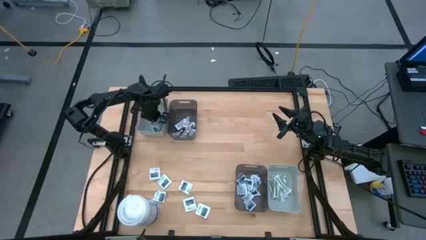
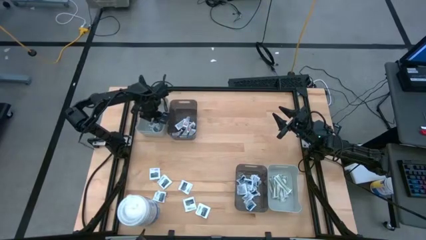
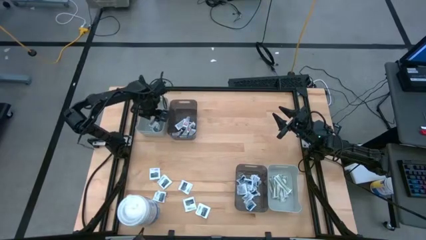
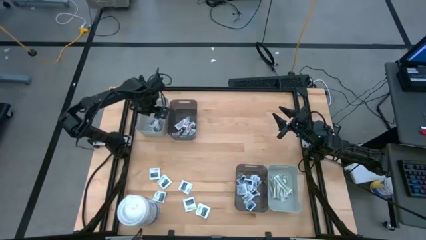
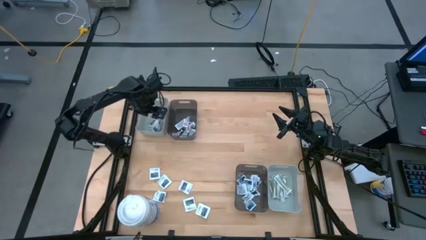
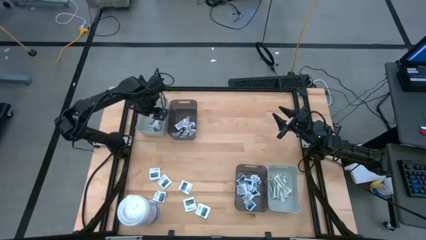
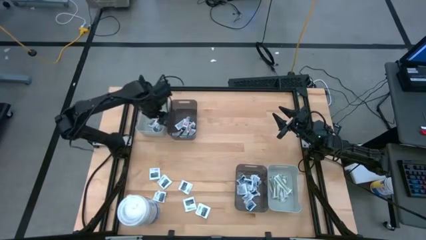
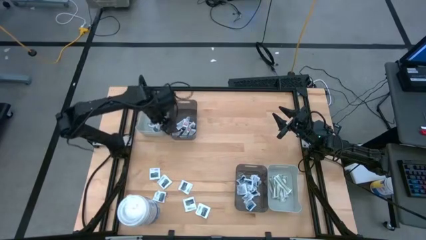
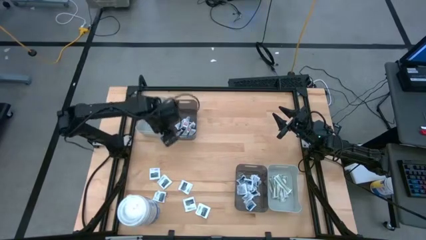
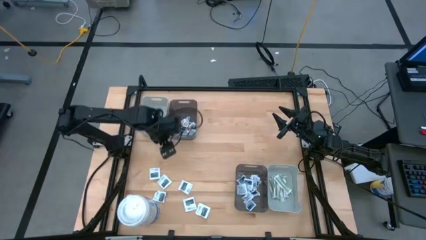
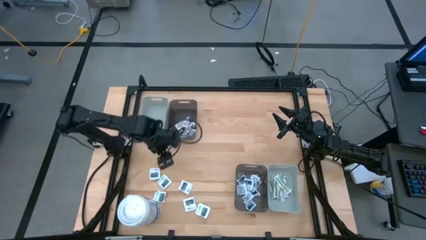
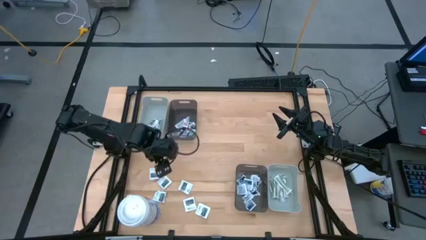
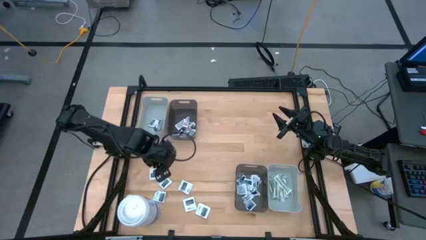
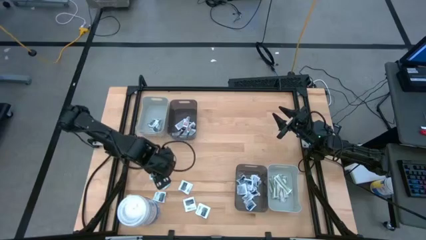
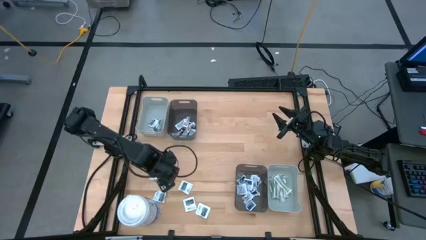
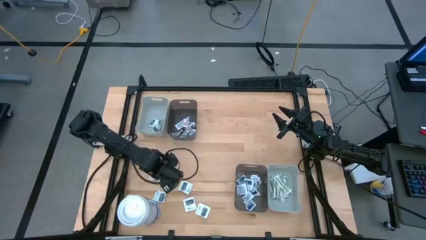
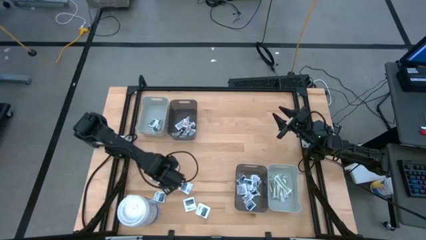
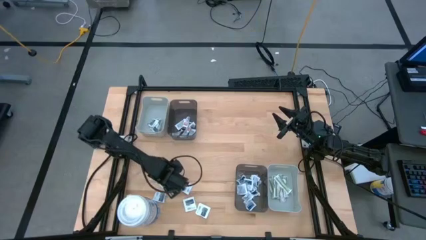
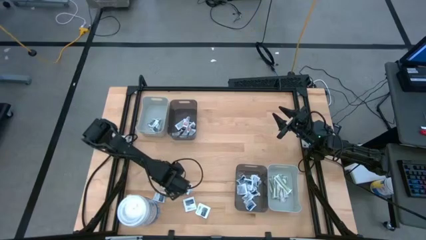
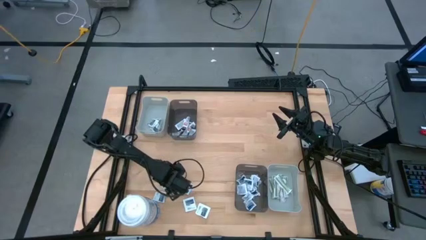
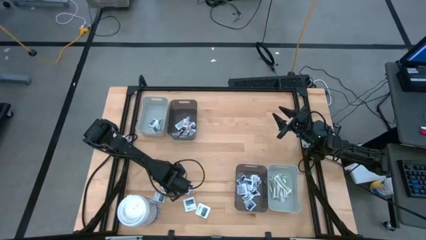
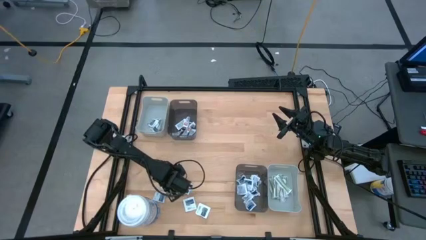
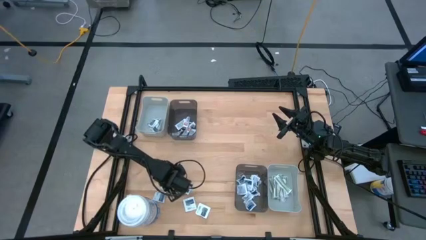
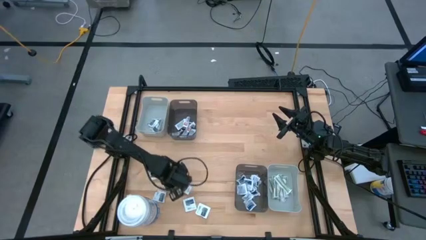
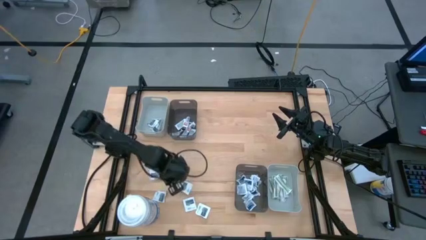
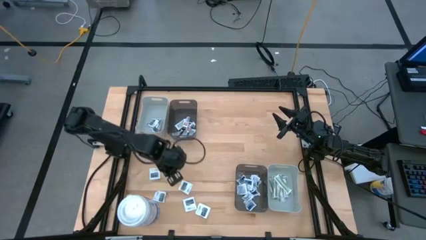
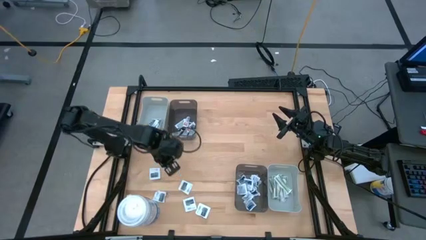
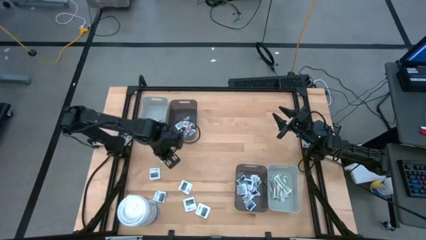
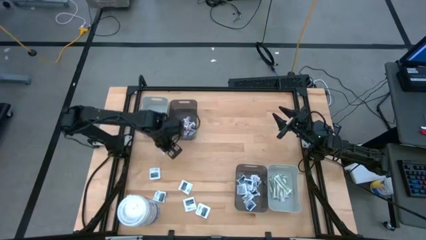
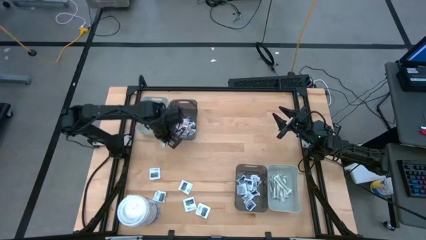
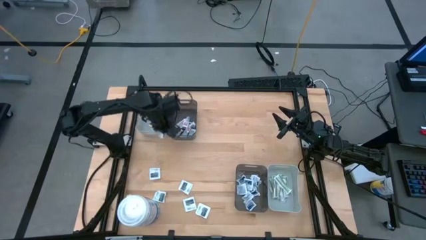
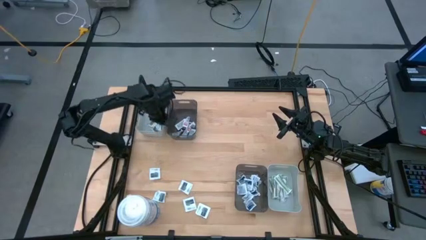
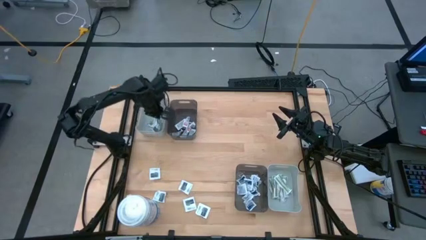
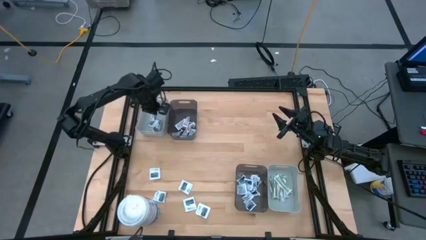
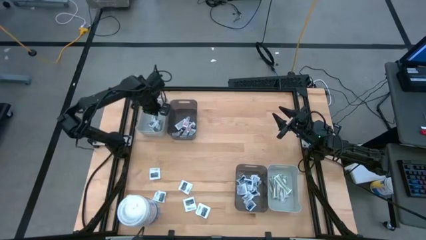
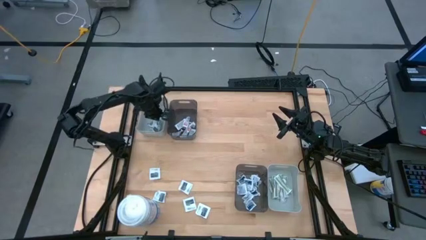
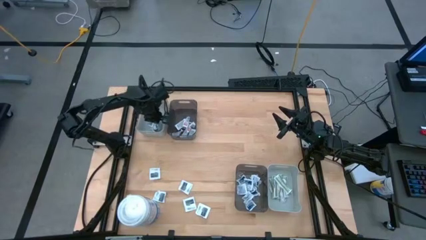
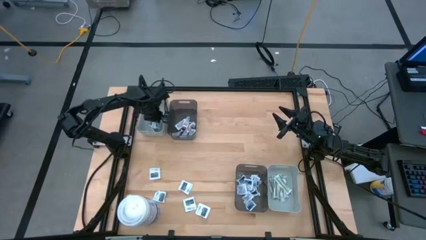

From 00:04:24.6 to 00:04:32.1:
Task: Pick & Place First Aid Supplies
Put the white towelette pack into the top gray bin

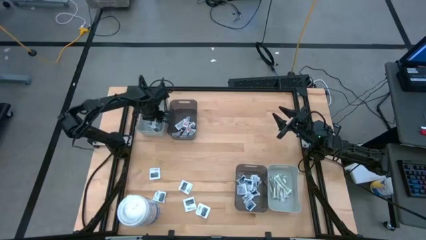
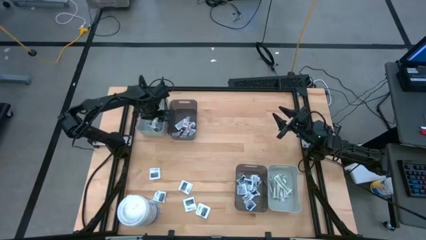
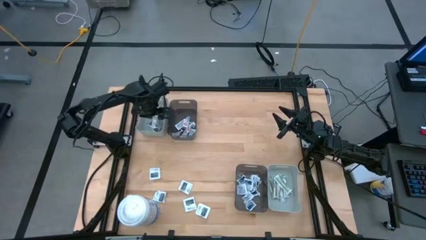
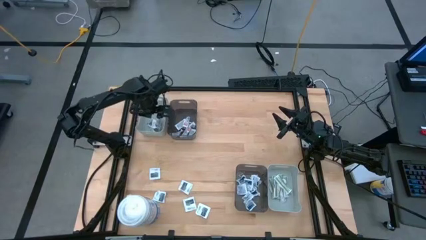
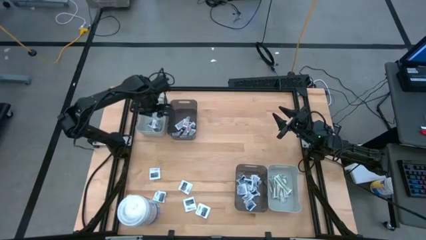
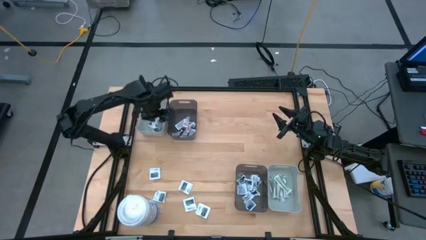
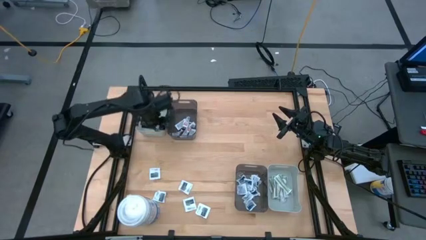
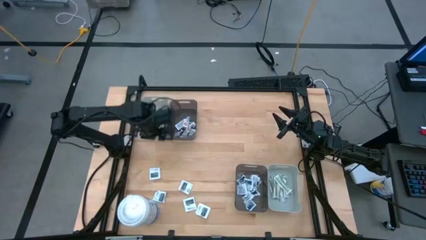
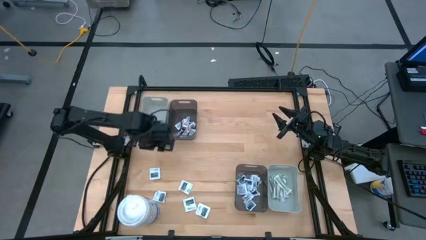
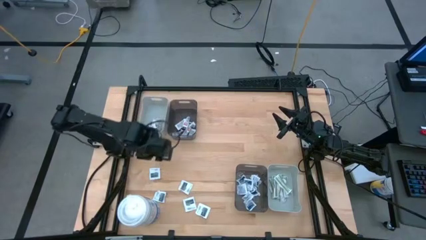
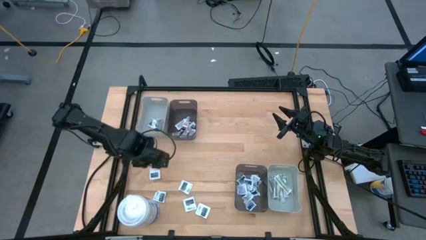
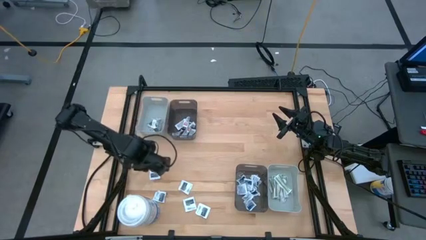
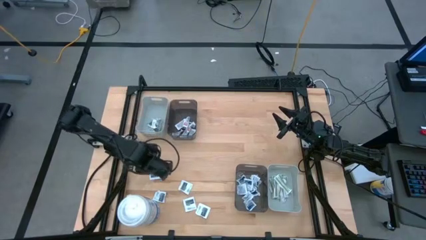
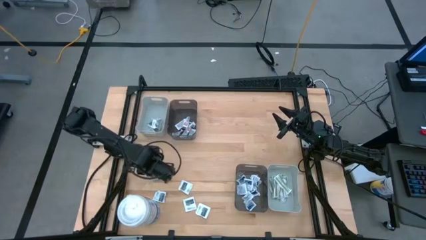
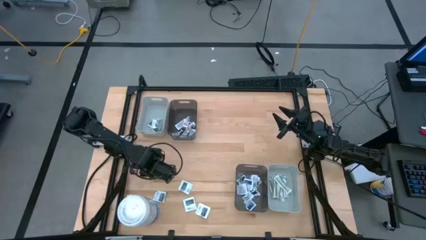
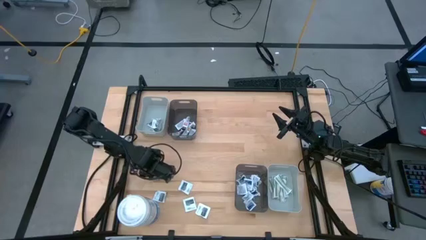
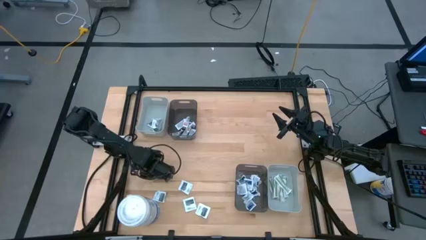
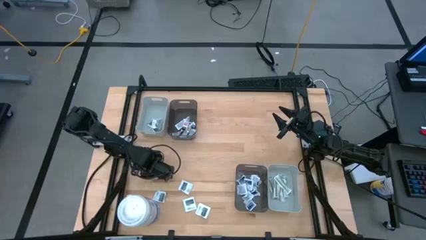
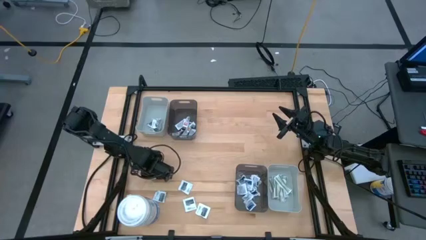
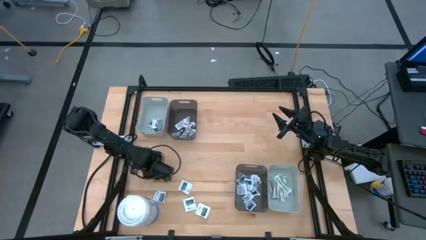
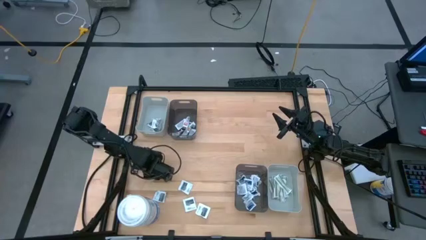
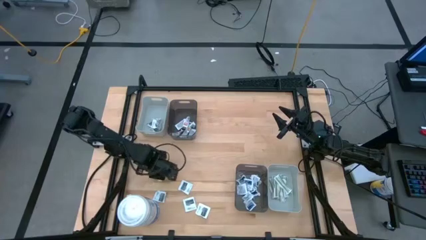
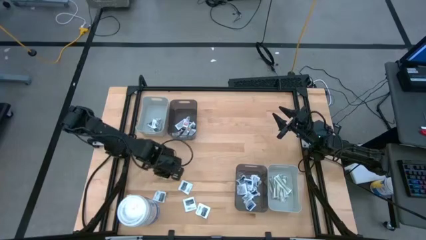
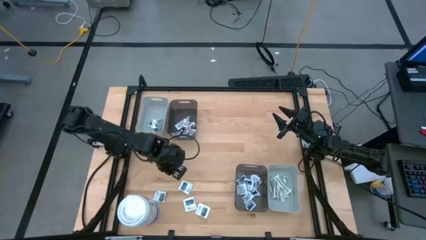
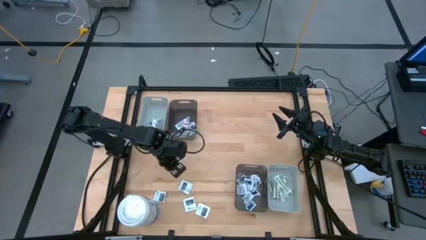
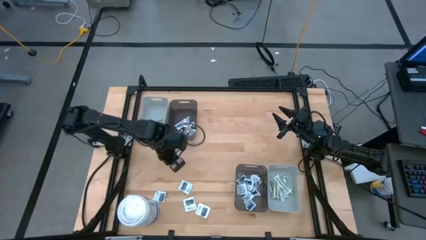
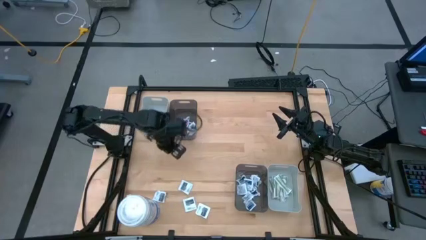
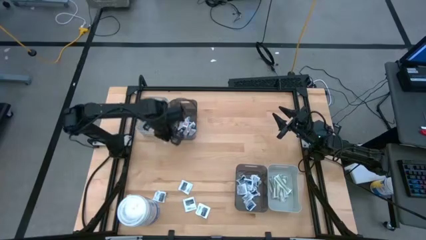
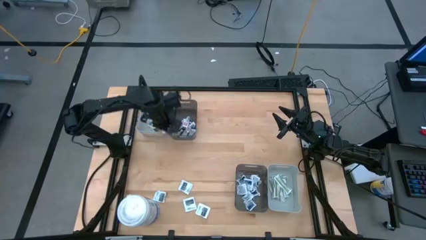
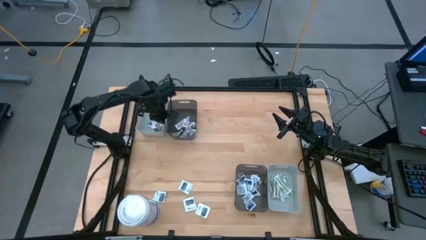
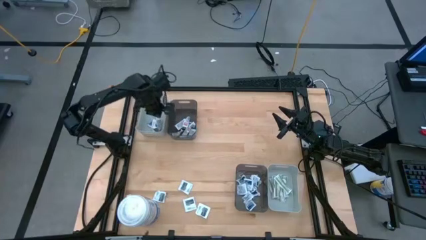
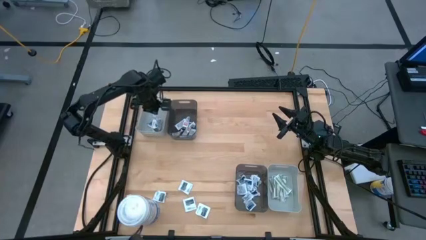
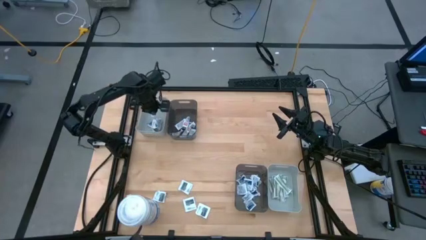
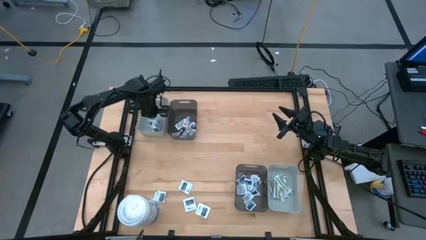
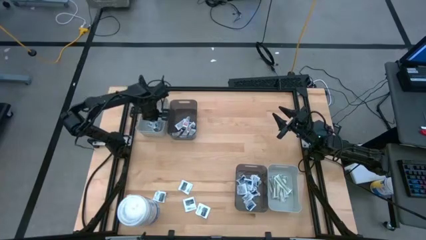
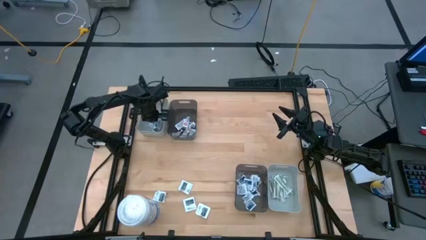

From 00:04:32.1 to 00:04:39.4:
Put the white towelette pack into the top gray bin
